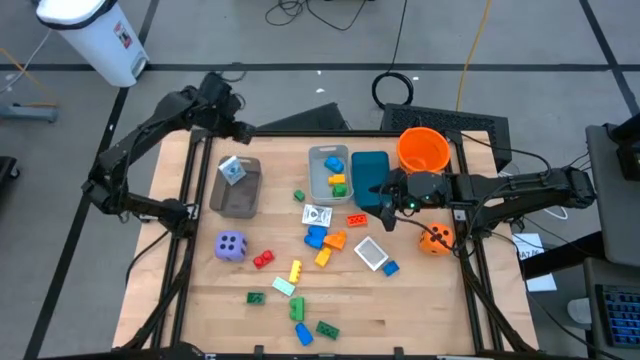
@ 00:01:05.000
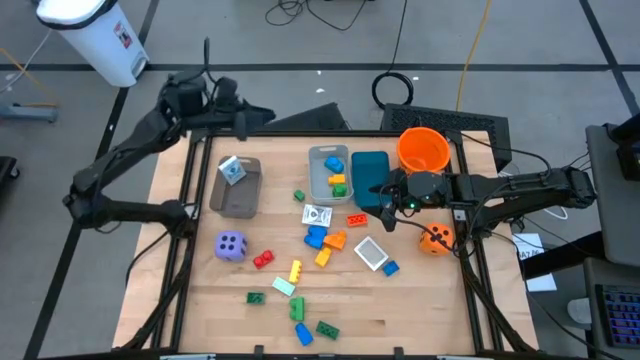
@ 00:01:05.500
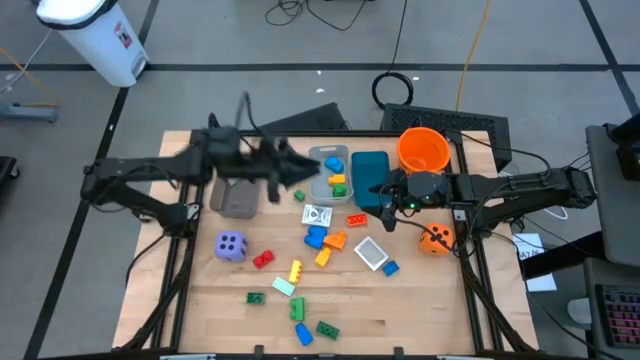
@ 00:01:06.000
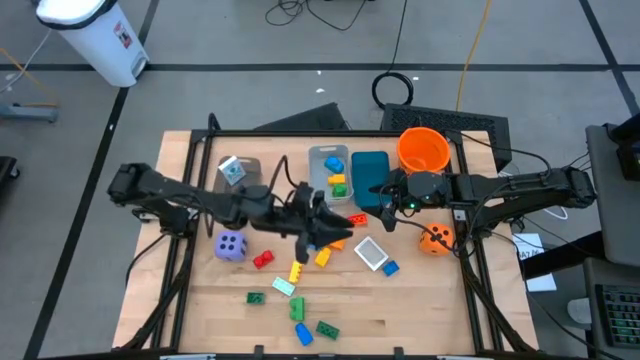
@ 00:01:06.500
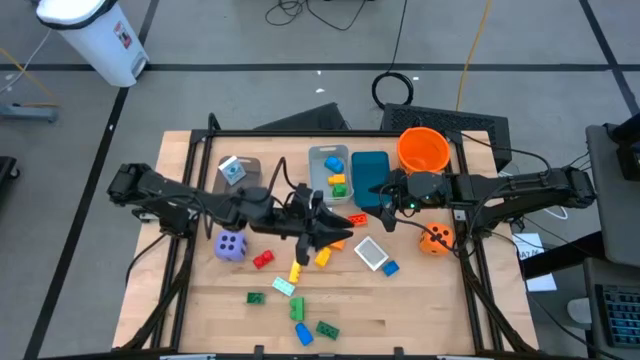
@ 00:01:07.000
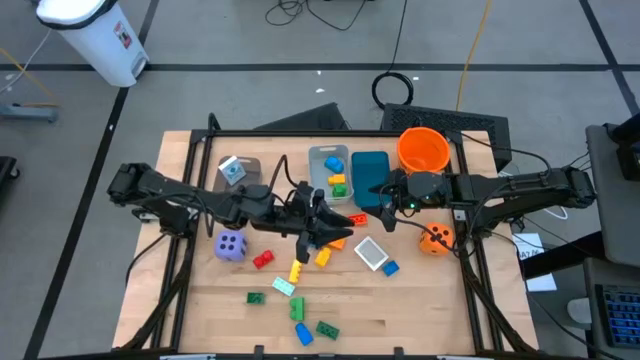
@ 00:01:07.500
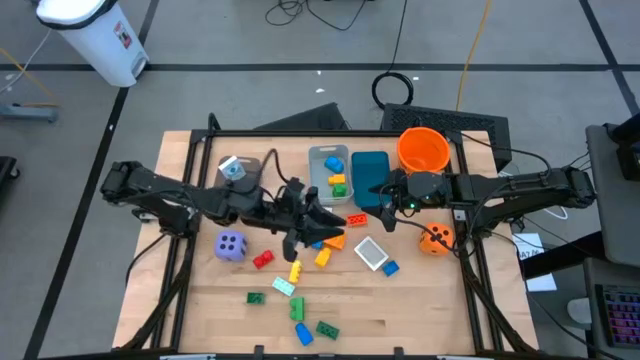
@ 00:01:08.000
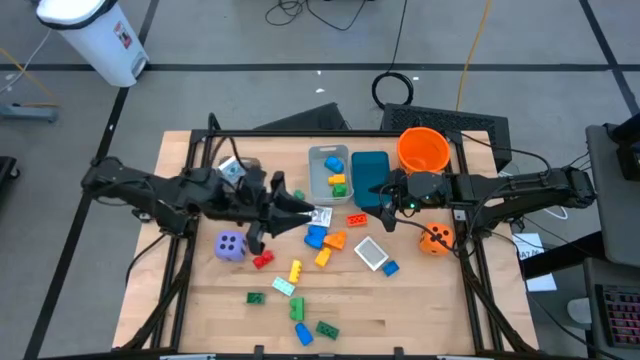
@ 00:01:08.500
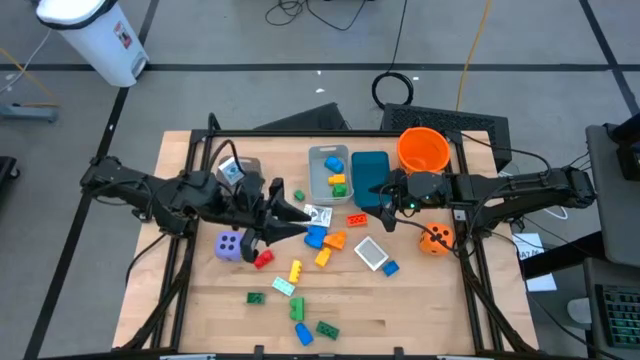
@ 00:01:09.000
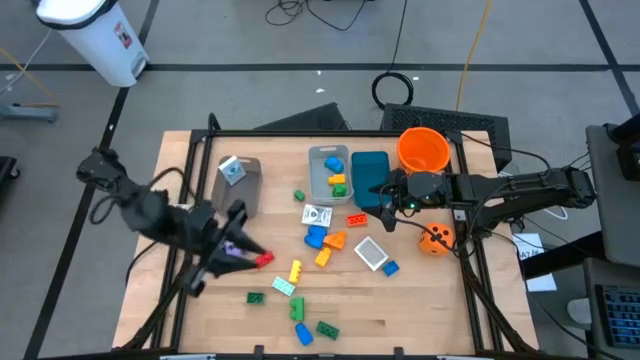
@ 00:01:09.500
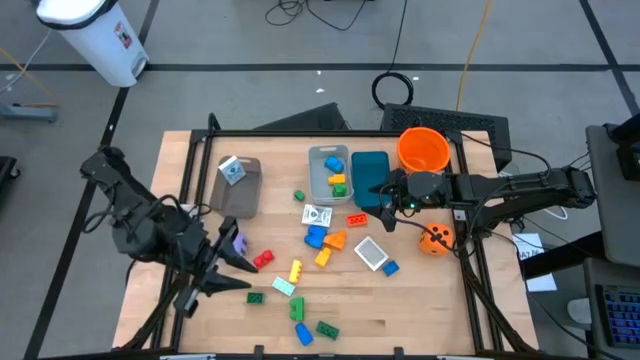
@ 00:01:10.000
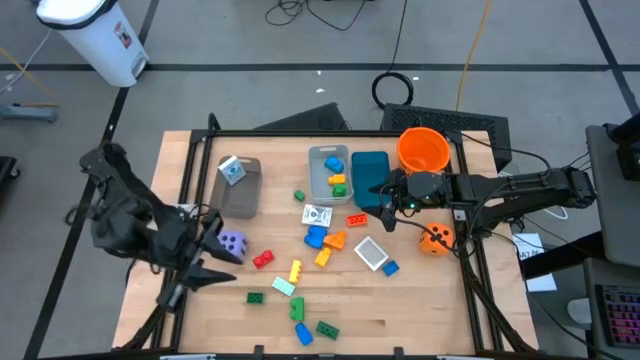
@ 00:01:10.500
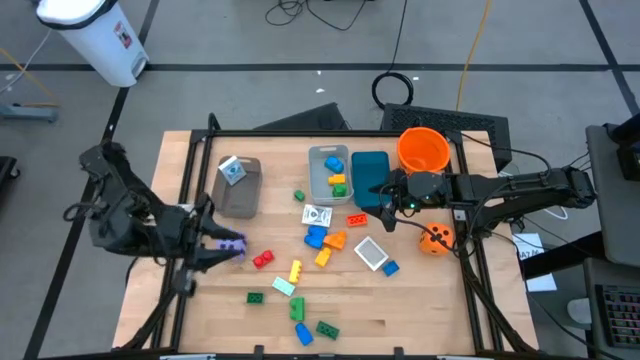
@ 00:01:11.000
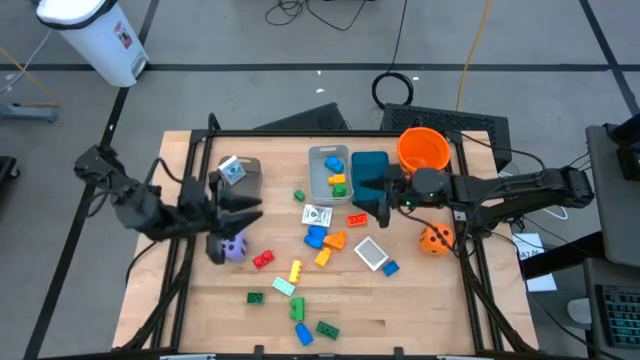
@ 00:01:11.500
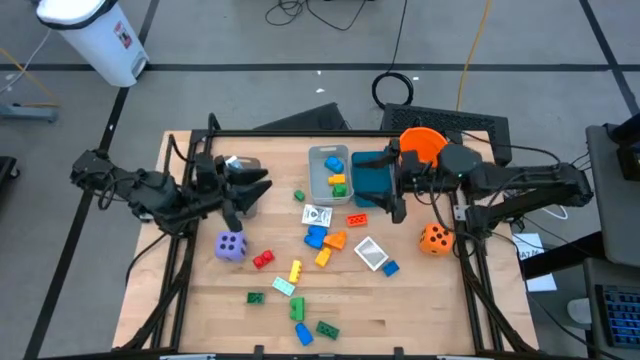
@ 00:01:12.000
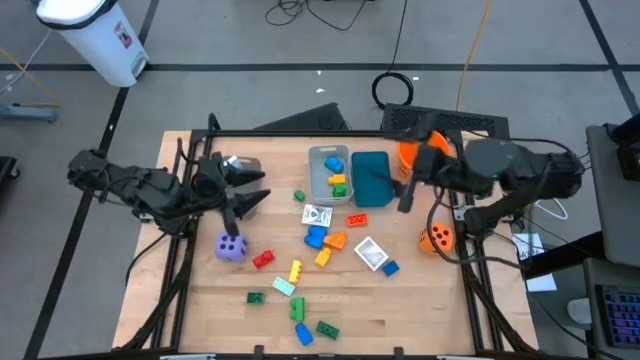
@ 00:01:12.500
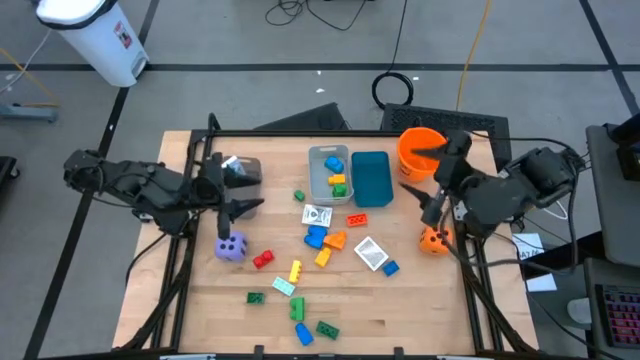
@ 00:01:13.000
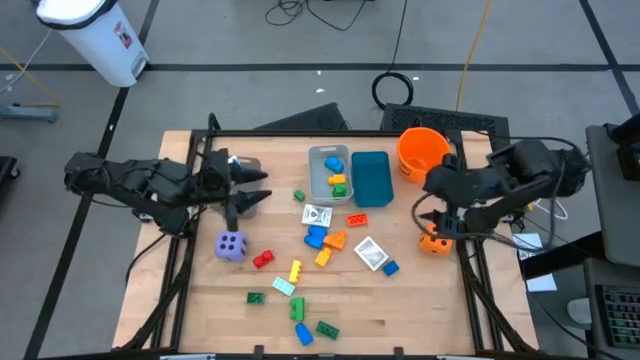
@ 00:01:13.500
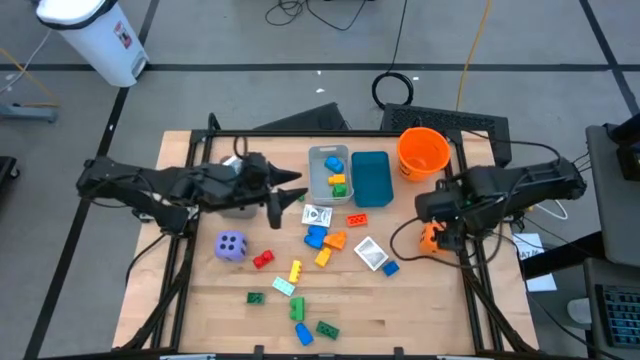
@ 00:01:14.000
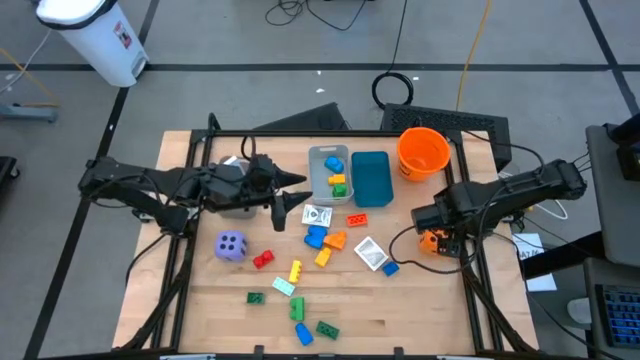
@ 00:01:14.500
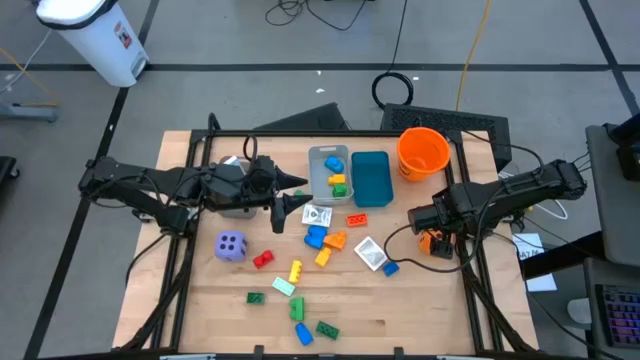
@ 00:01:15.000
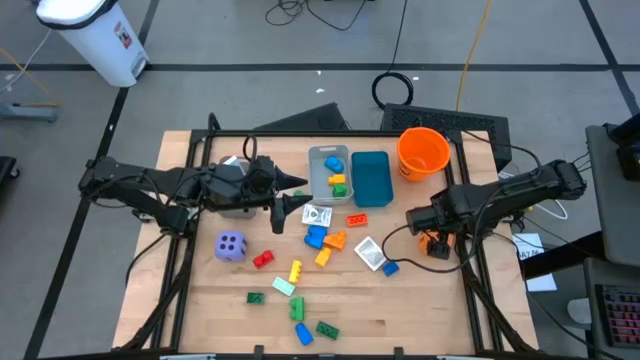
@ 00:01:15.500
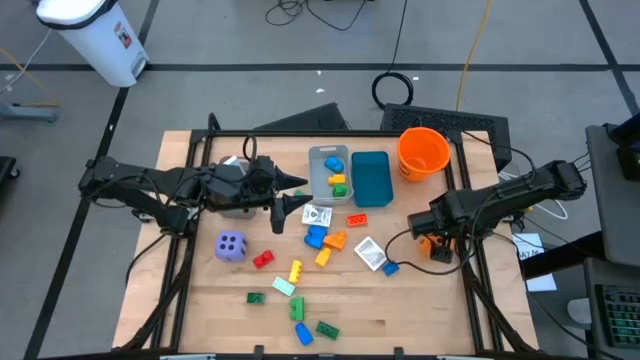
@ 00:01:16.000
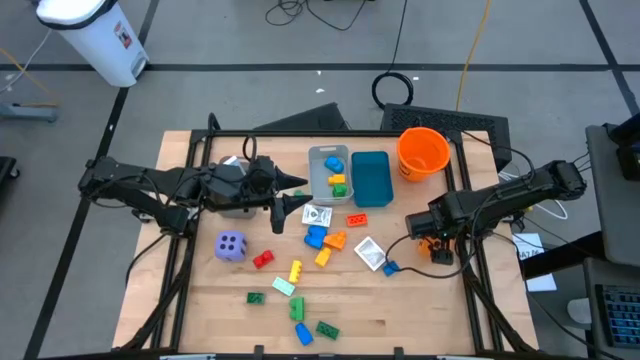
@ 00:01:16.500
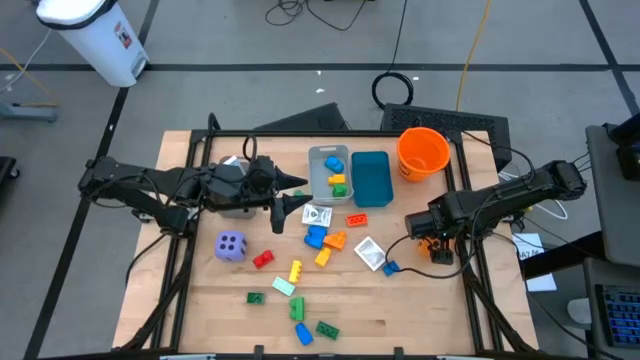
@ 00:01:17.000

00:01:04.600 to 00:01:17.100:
Task: Pick & Place Toys
Put the orange dice into the blue bin
